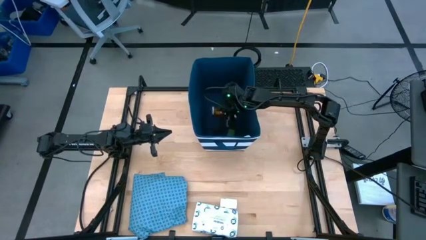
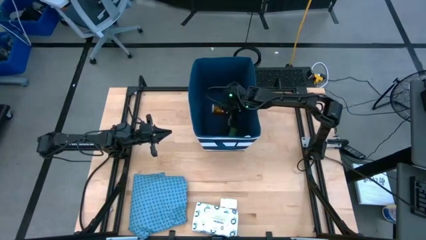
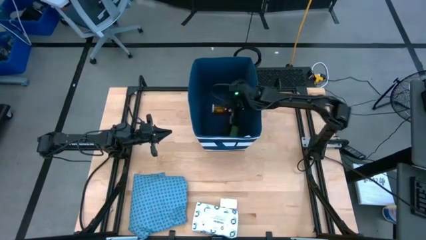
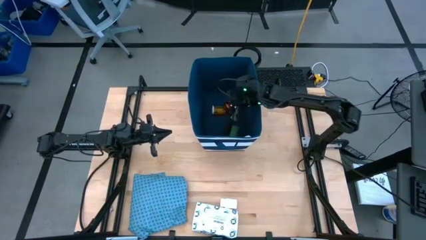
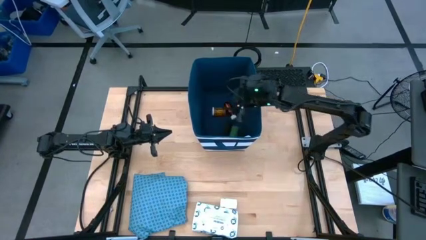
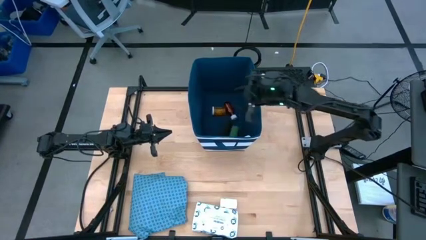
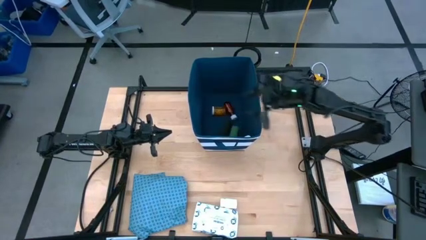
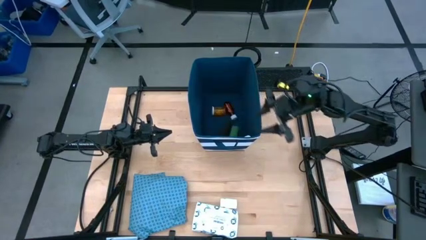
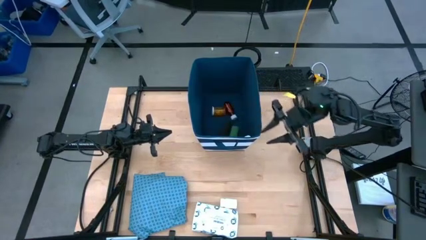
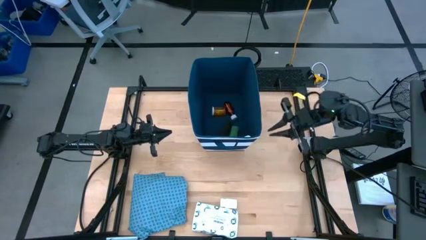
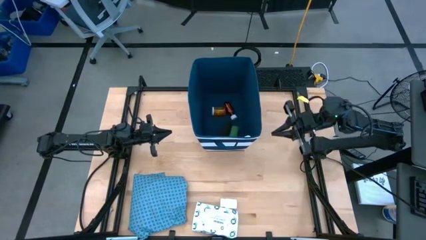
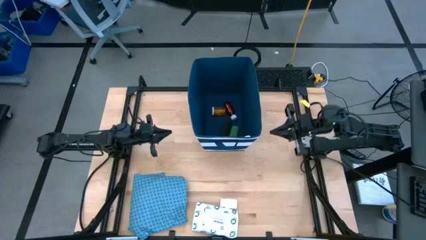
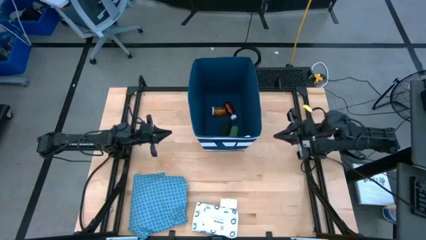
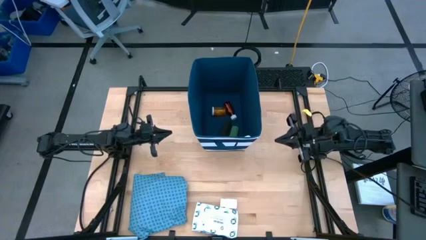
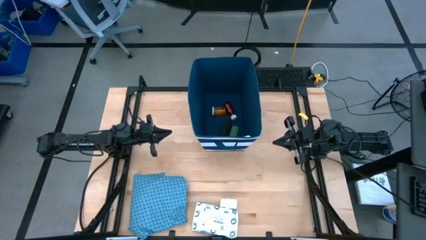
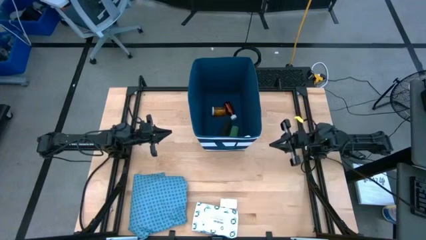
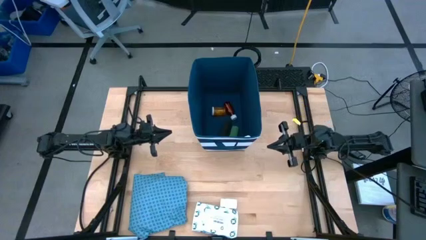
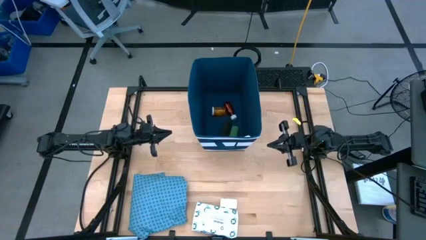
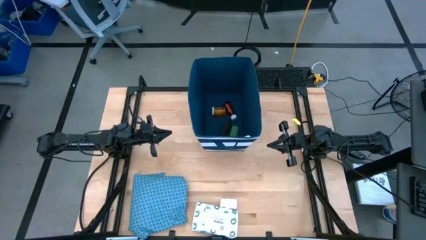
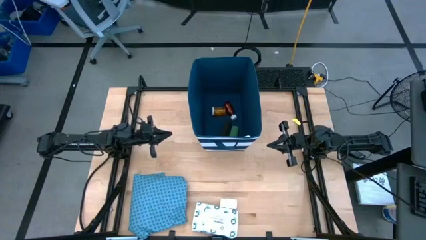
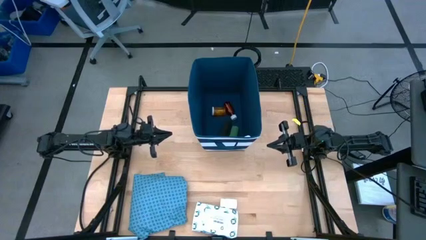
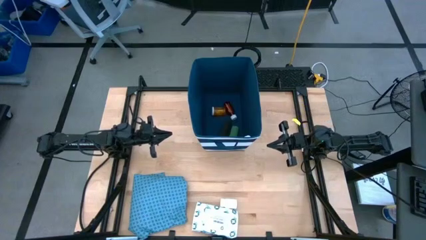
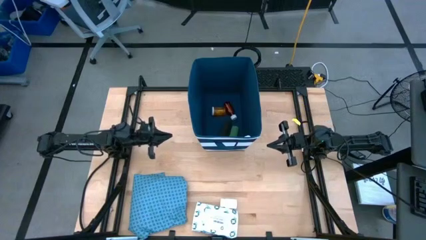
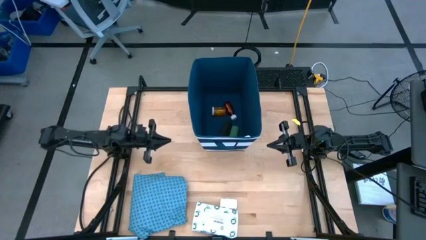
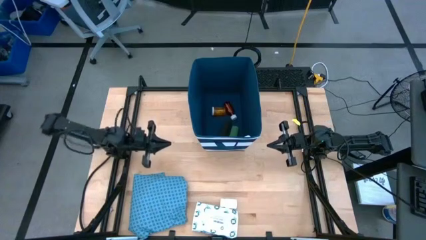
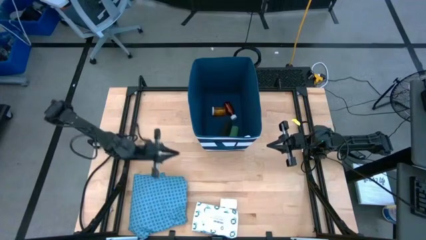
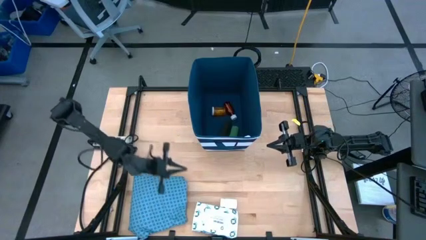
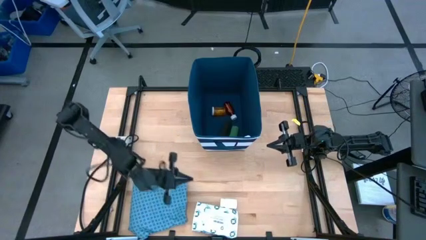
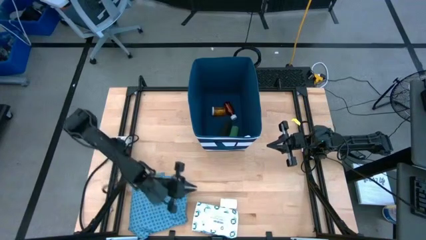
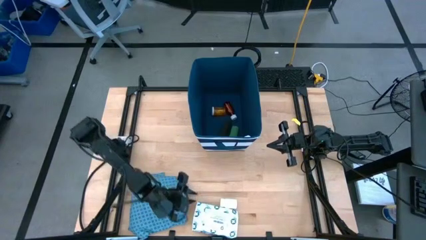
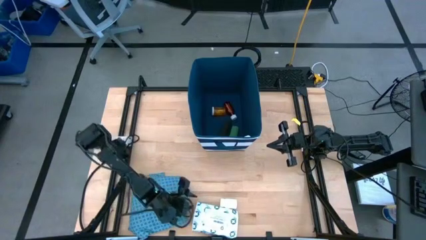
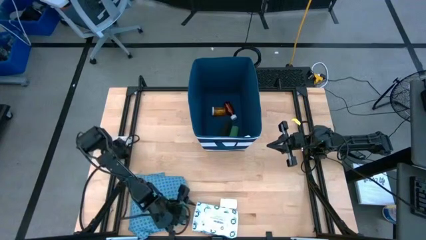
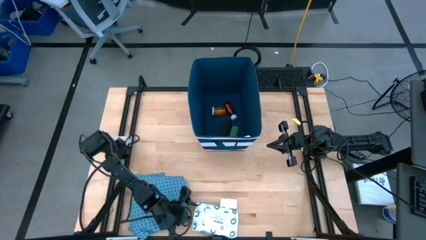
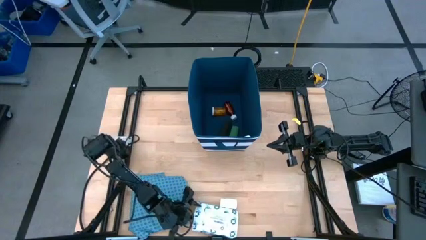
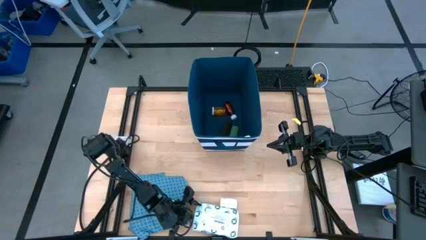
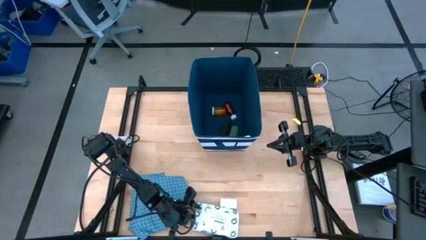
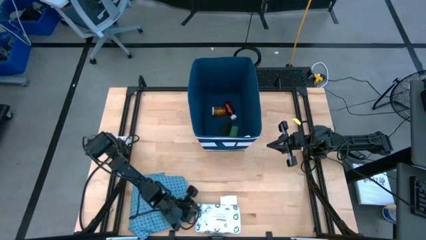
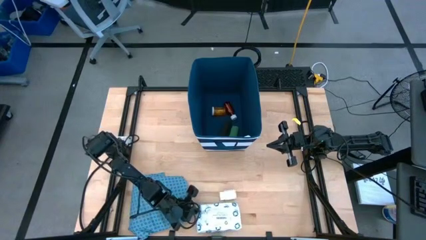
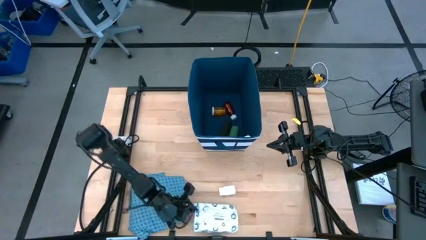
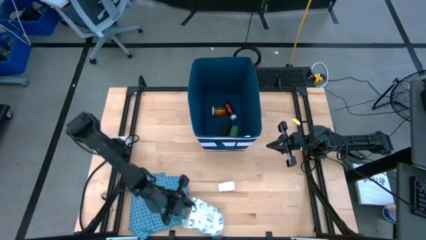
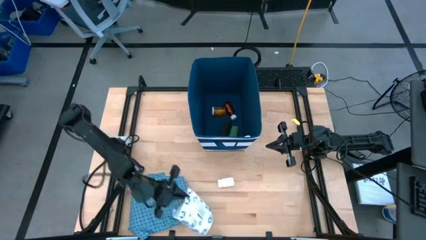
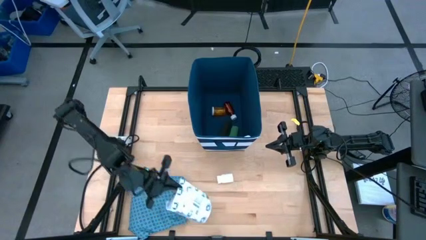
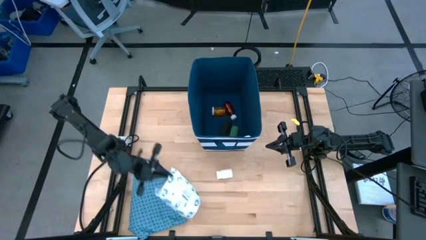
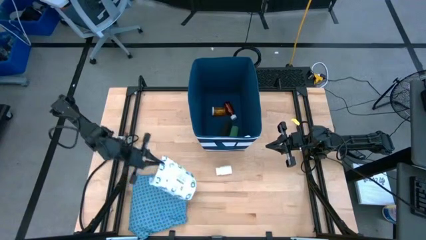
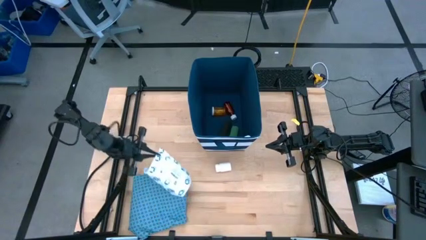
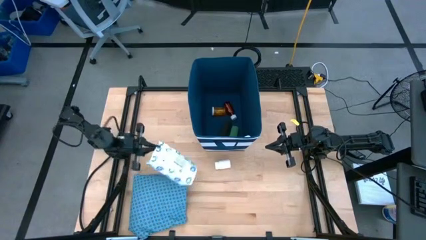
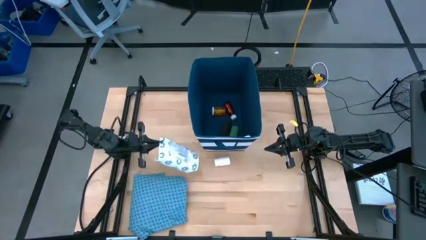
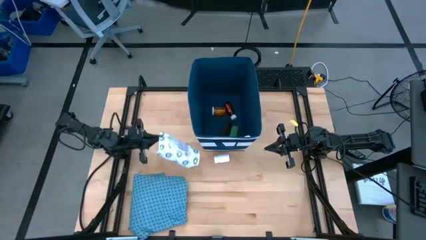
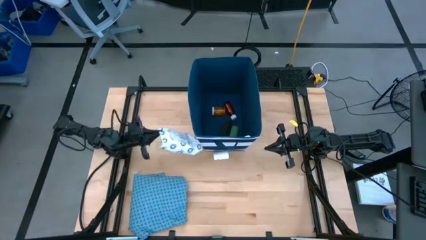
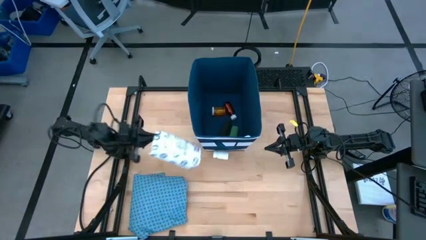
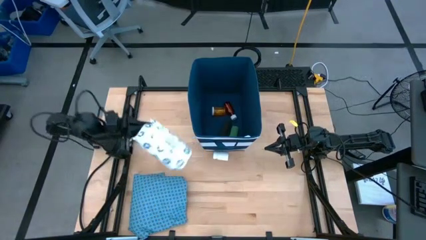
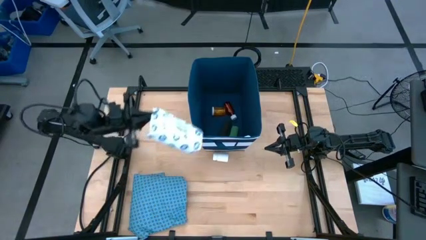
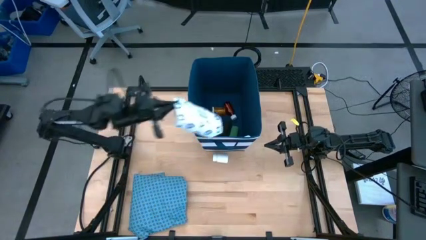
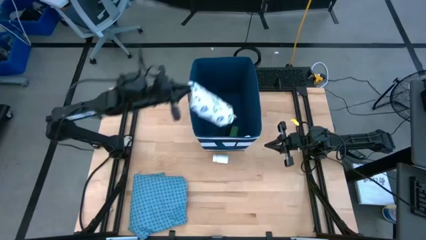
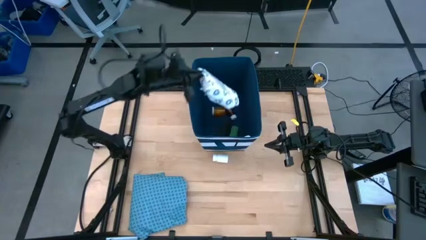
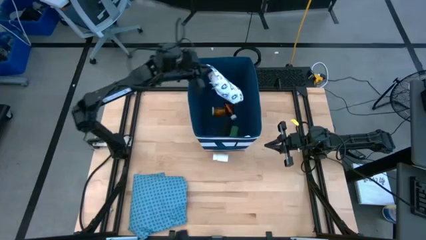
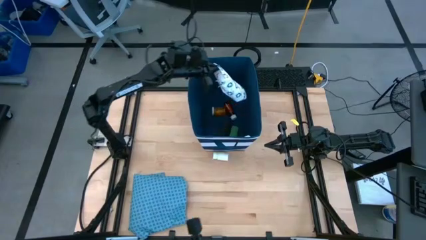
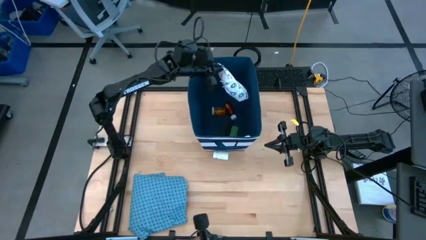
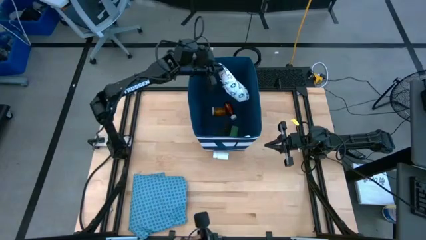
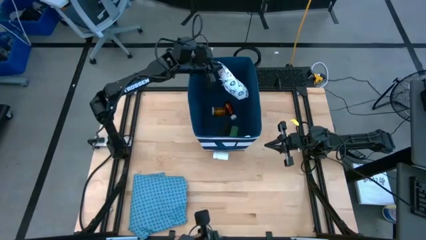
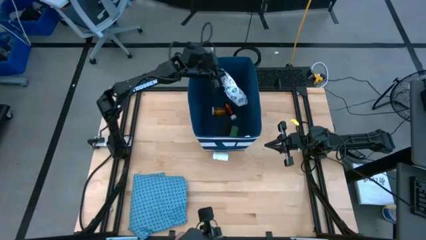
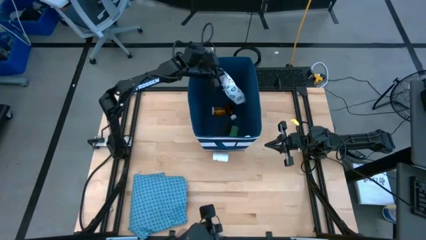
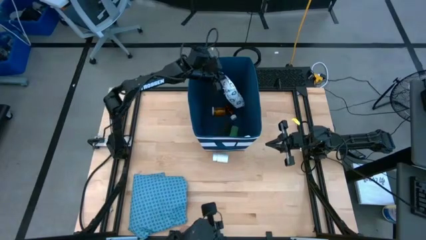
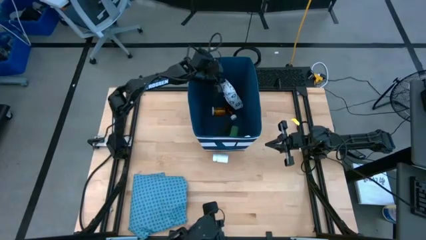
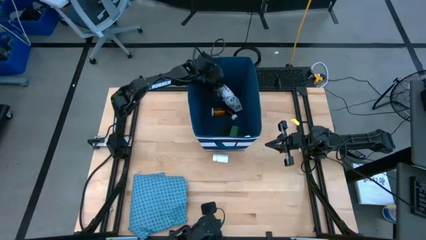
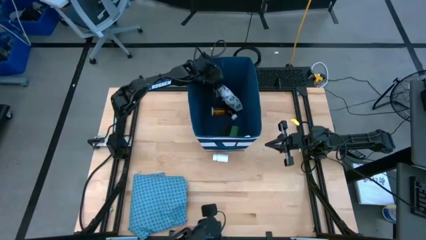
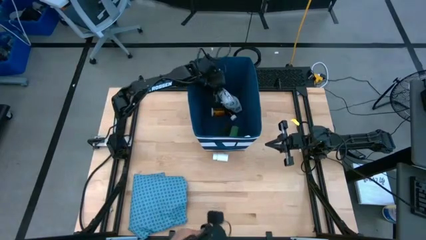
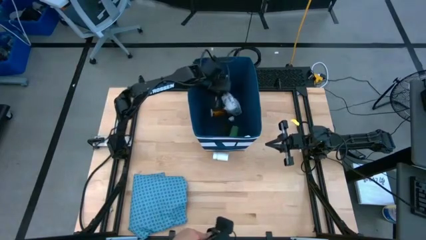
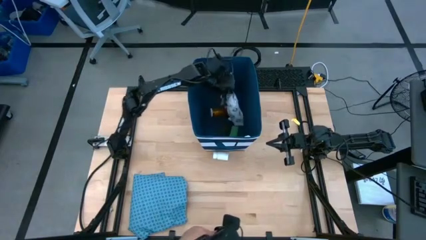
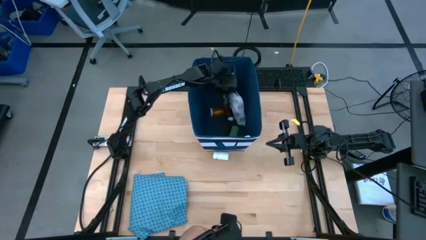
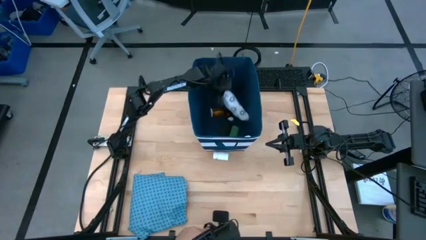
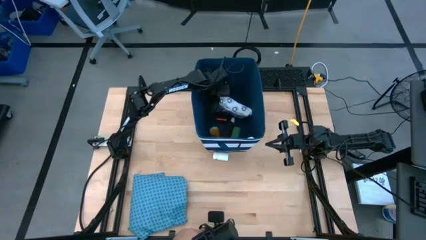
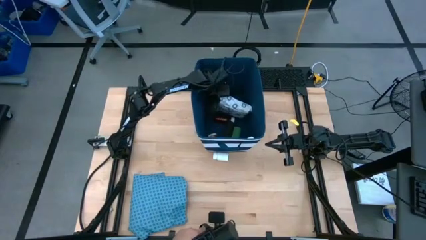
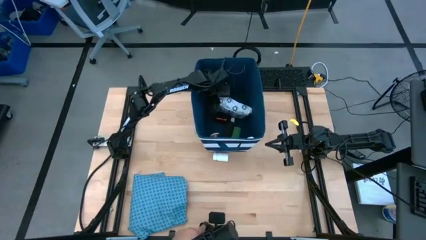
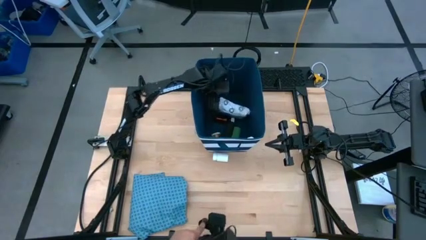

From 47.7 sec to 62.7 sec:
Task: Pick & place medical supplies in basket/bin
Put the mailer bag into the basket

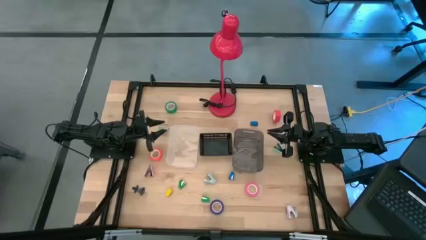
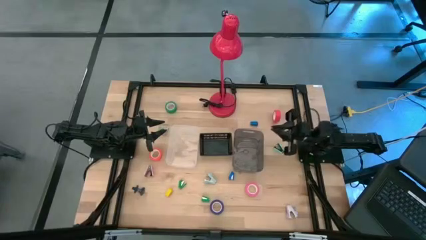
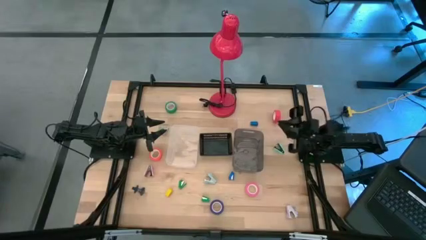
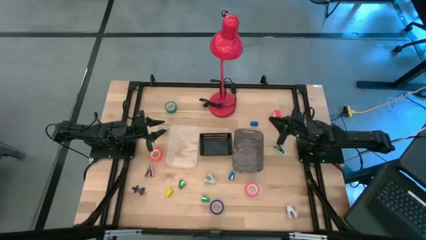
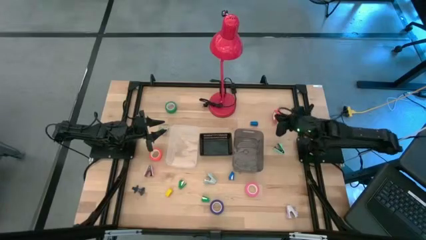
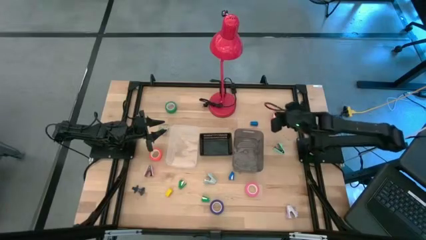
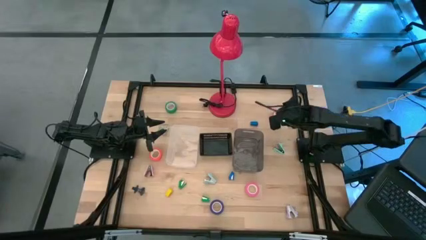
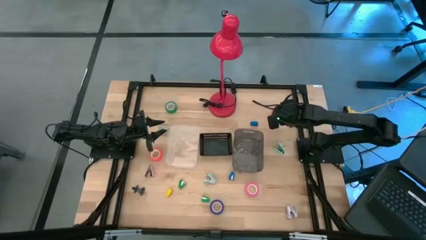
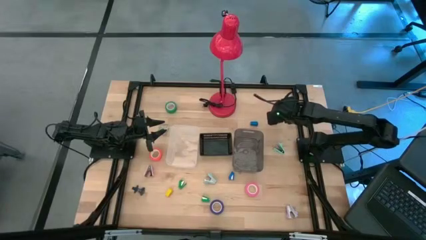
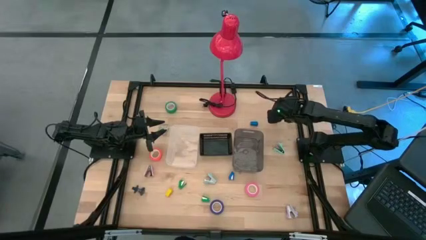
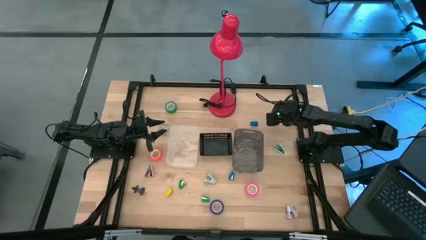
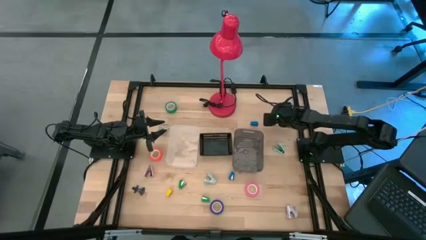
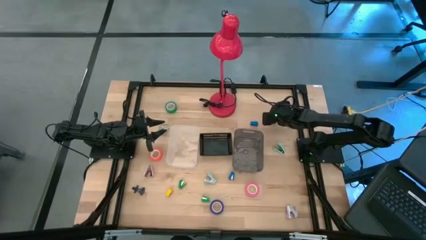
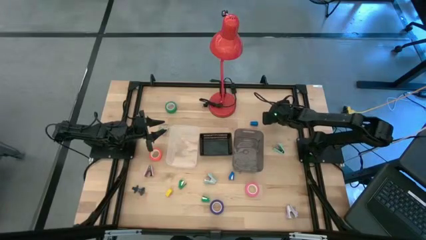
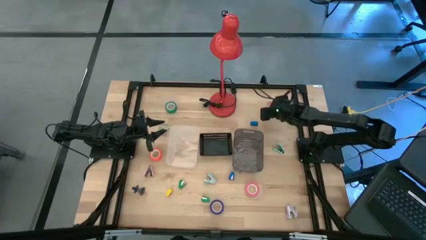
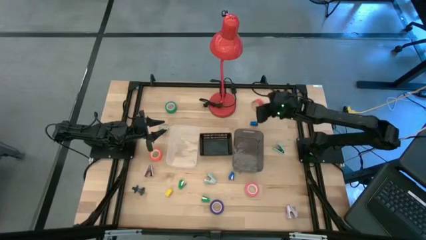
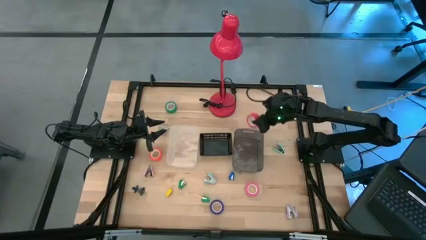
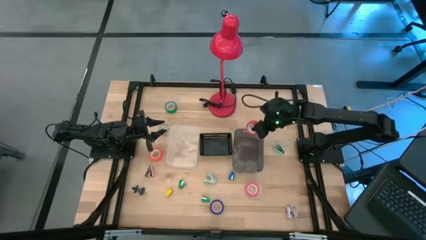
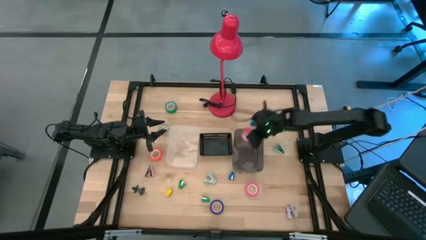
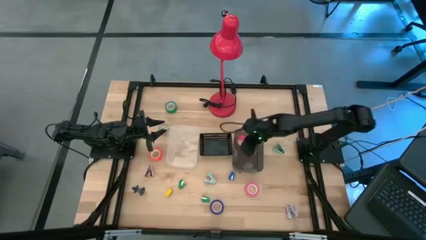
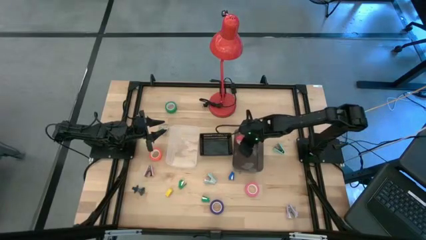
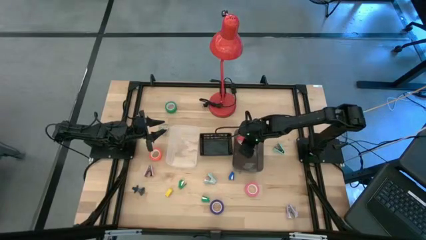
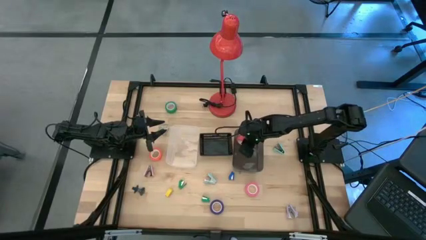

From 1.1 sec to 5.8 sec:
Task: Pick and place Stapler, Stapler remover, tape
Put the red tape into the black bin
